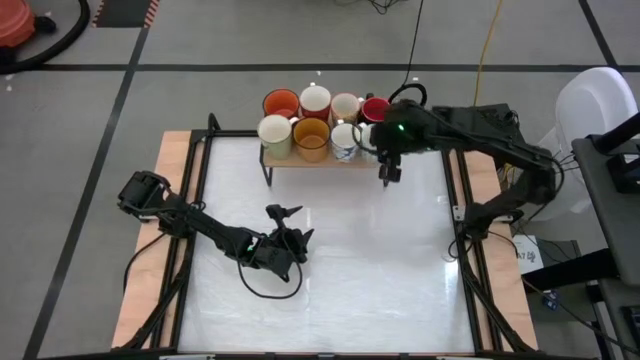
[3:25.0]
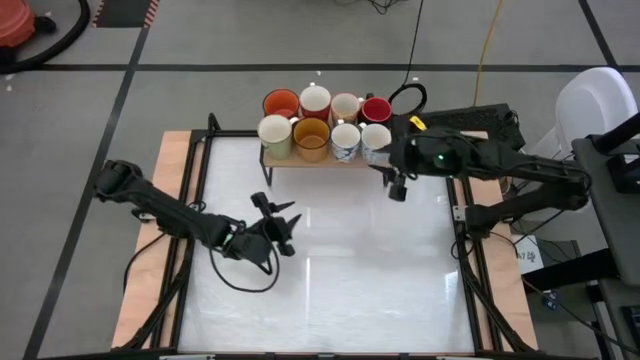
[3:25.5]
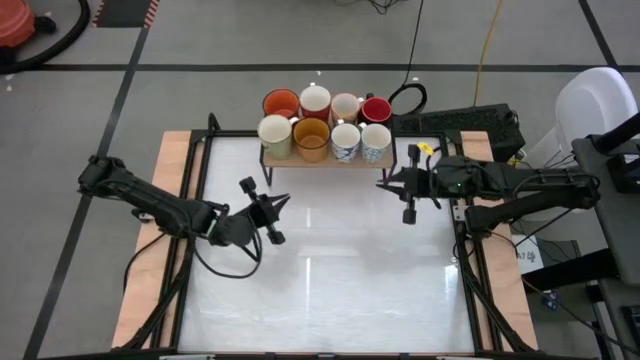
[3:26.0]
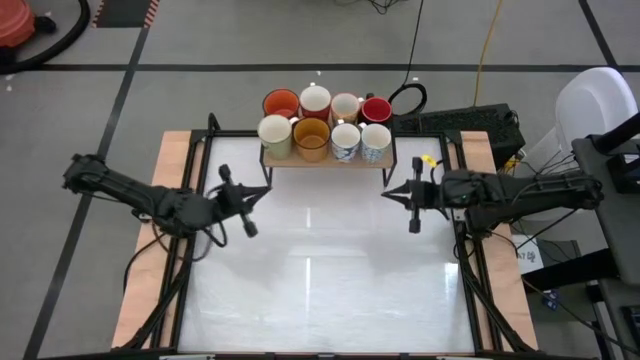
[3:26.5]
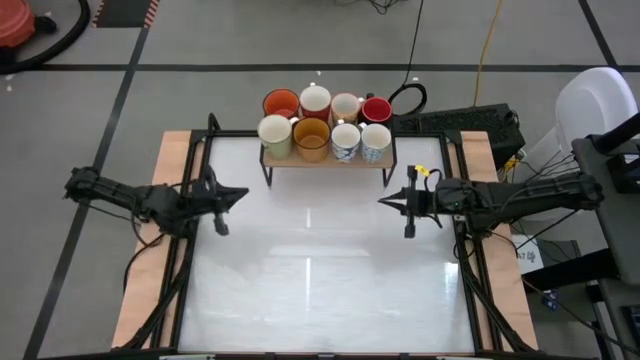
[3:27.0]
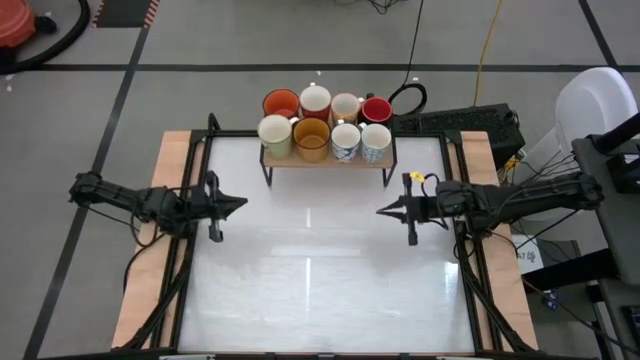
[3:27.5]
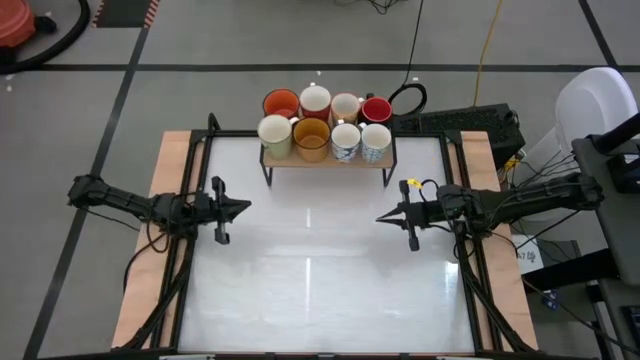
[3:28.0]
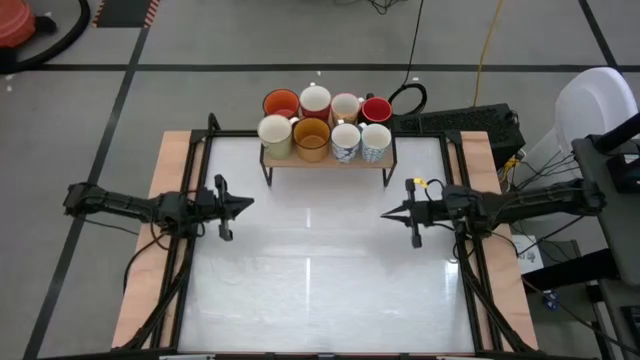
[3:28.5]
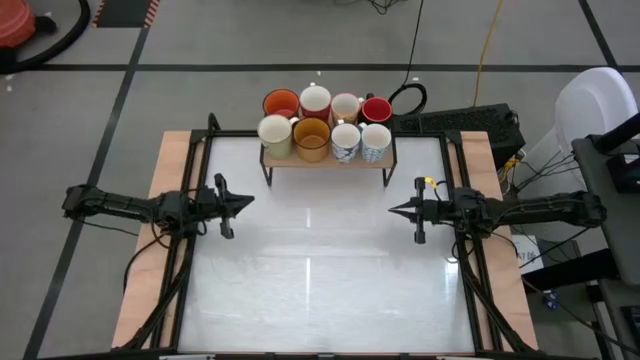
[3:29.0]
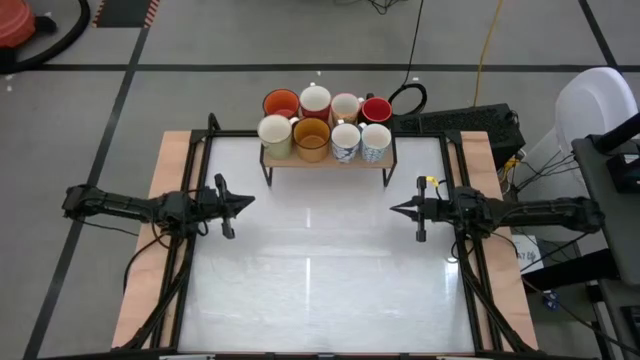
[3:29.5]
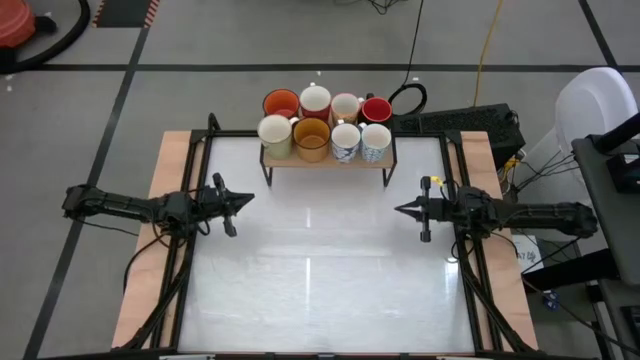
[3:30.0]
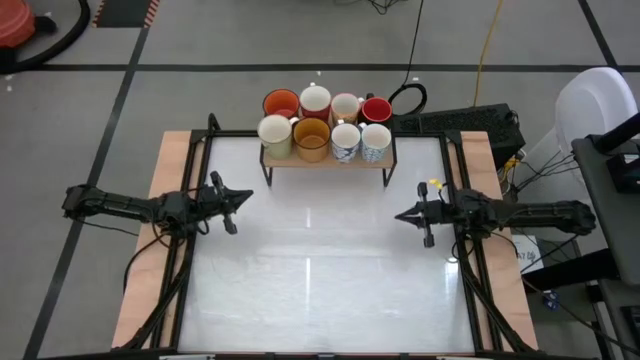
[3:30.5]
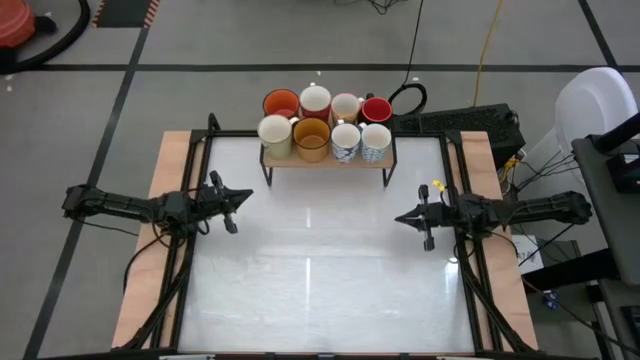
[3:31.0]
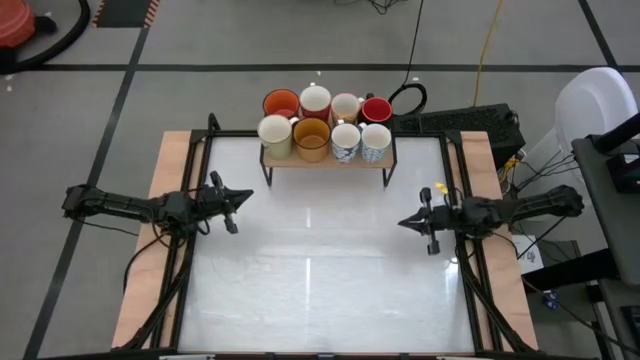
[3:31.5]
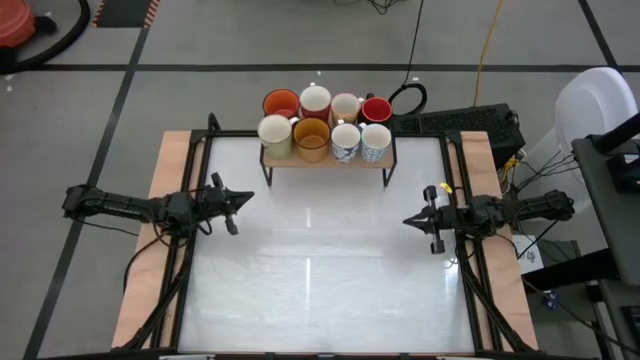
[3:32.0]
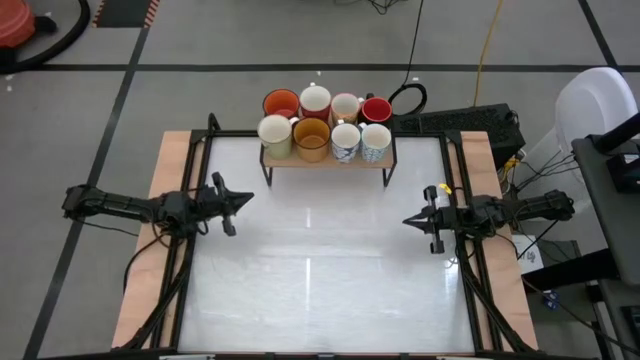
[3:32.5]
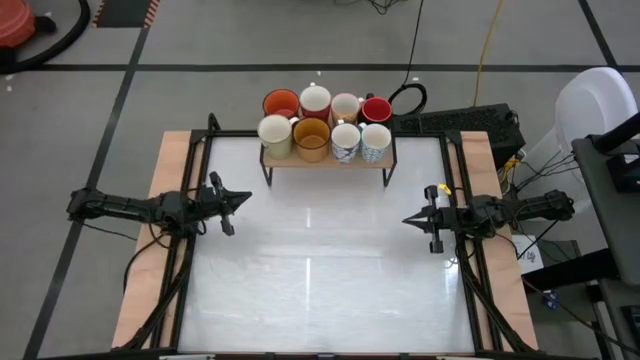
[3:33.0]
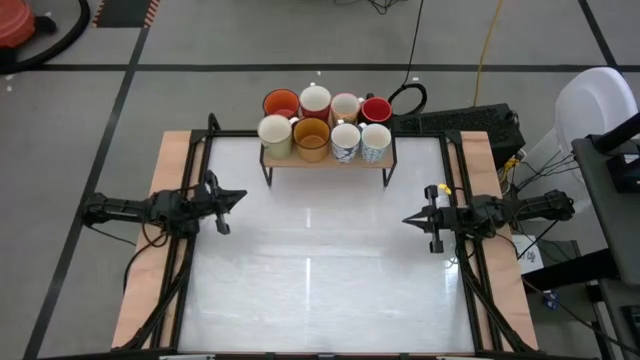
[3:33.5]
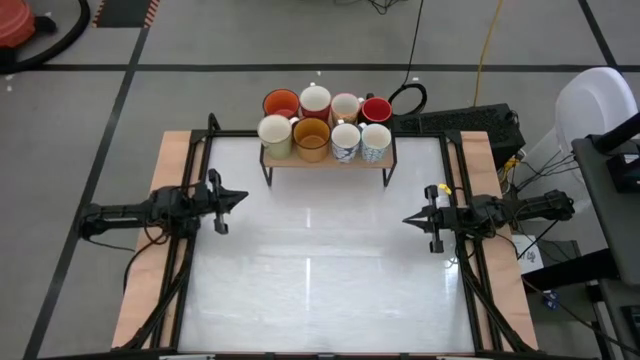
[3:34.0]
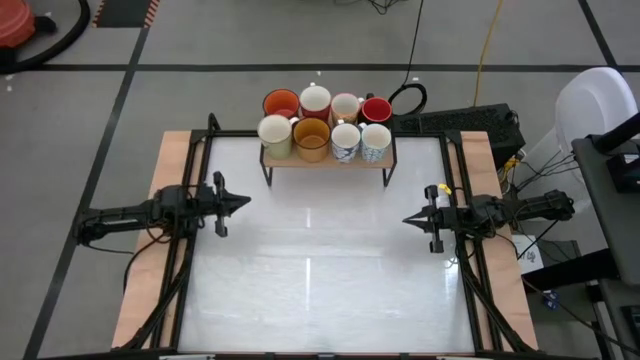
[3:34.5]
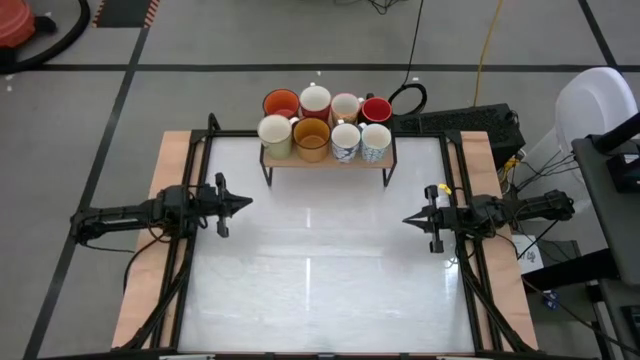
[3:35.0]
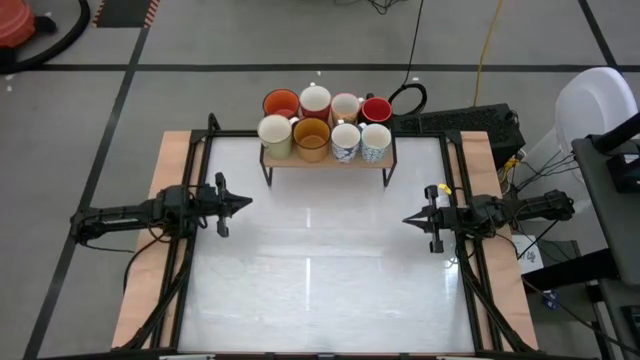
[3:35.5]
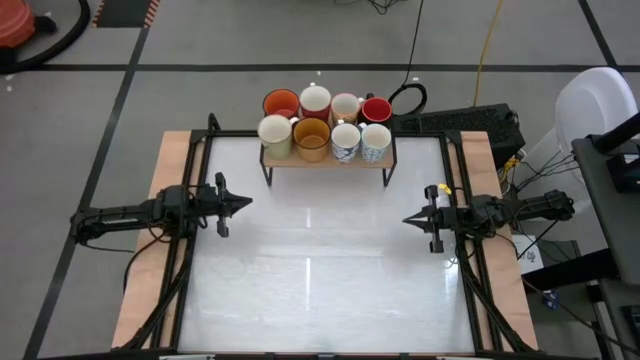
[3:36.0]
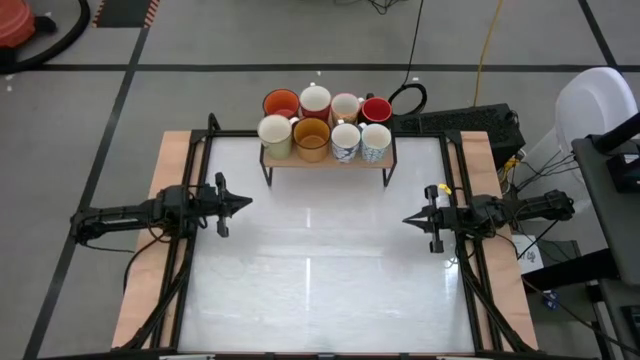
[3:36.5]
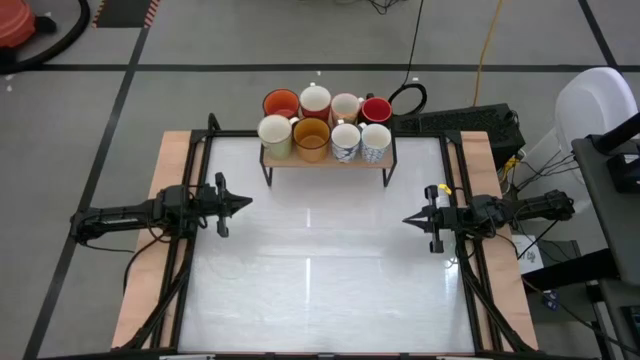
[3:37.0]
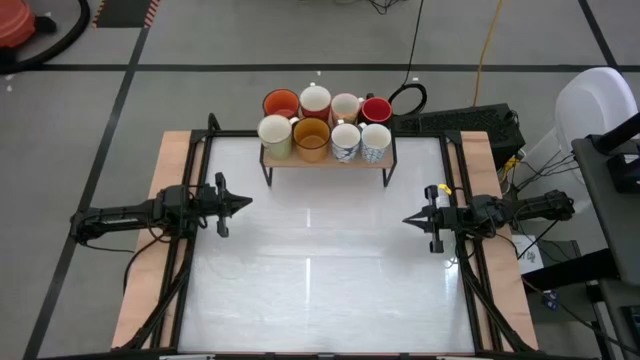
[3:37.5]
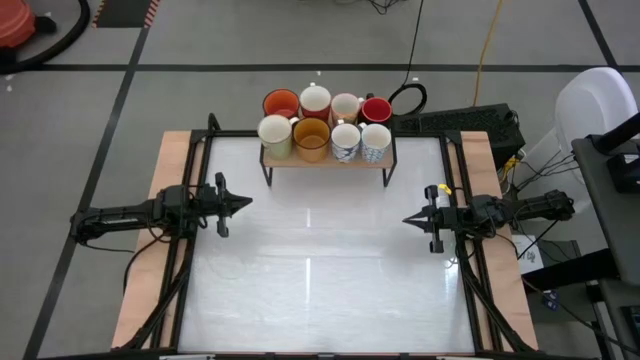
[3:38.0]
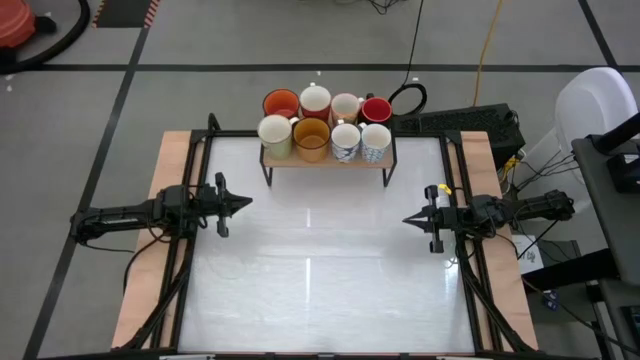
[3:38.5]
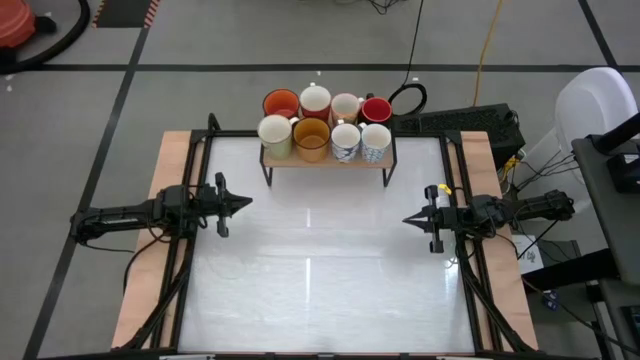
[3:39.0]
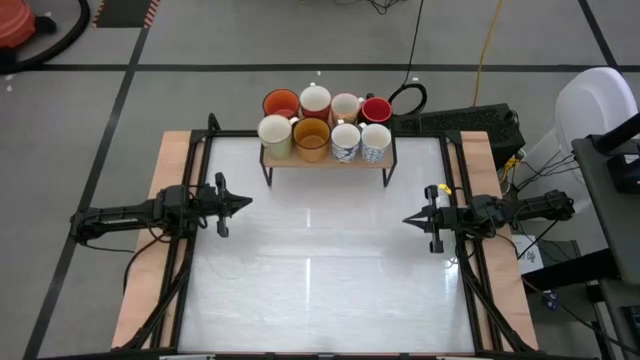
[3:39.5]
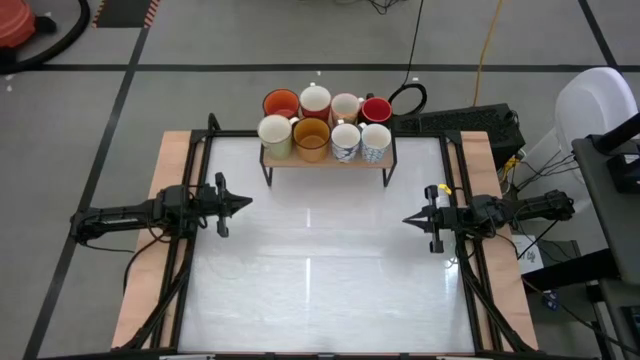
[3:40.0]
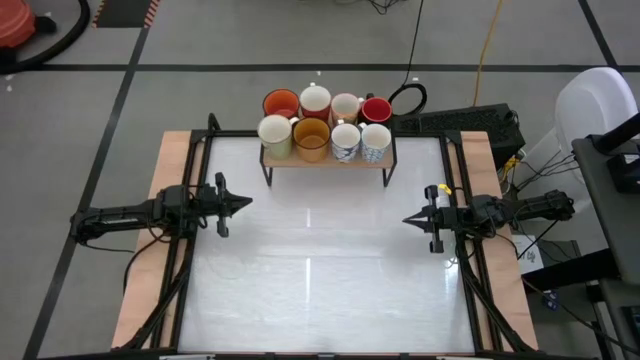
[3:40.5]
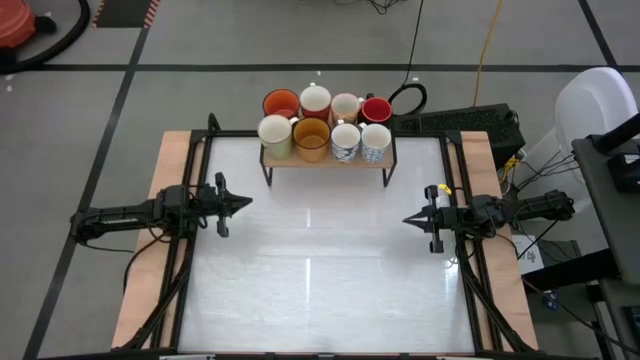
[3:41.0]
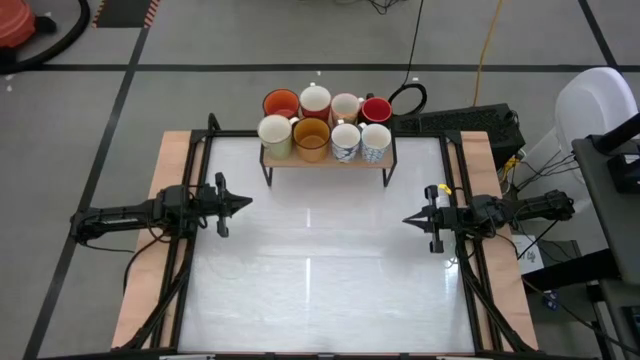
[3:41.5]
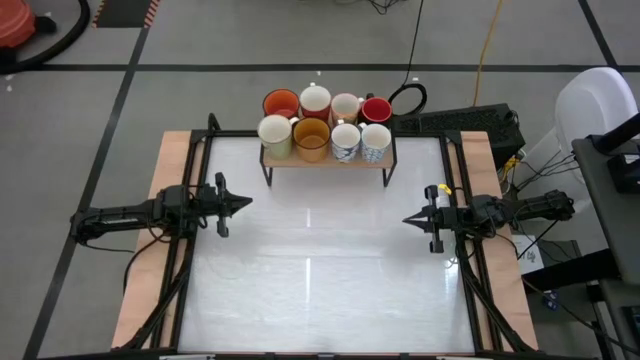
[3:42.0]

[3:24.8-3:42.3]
Task: Place coffee mugs
Return to Home Position

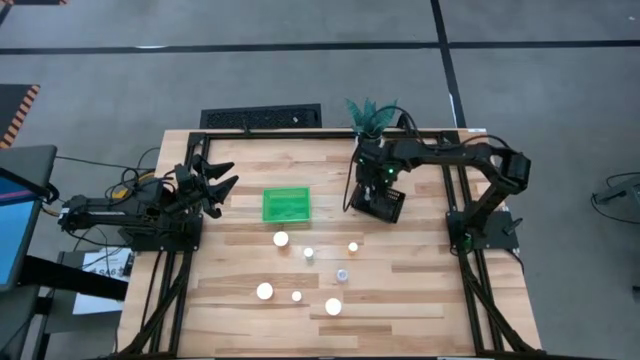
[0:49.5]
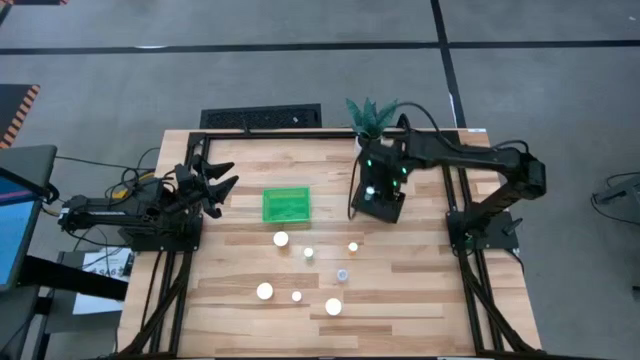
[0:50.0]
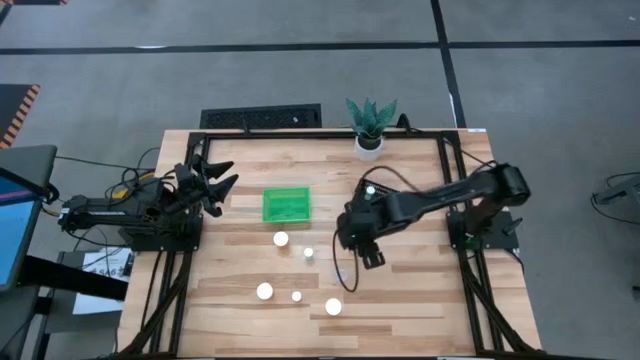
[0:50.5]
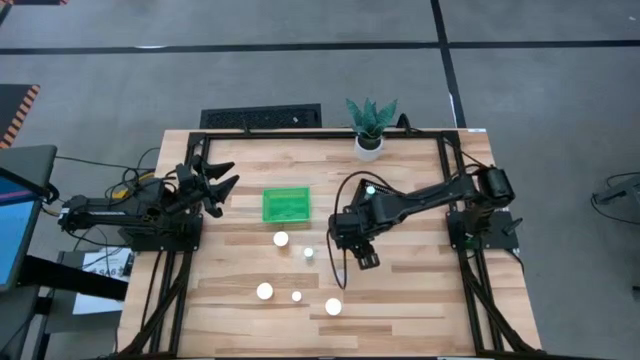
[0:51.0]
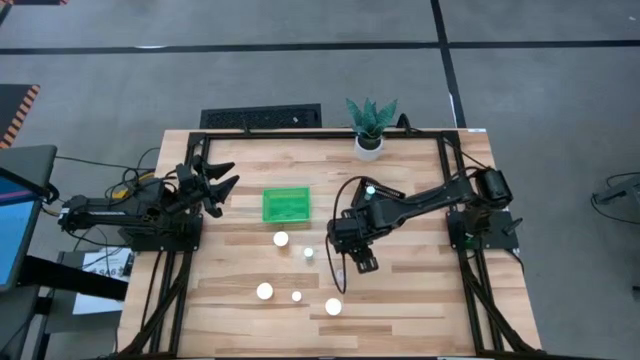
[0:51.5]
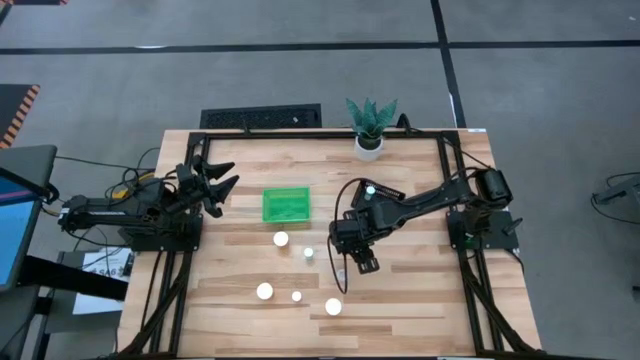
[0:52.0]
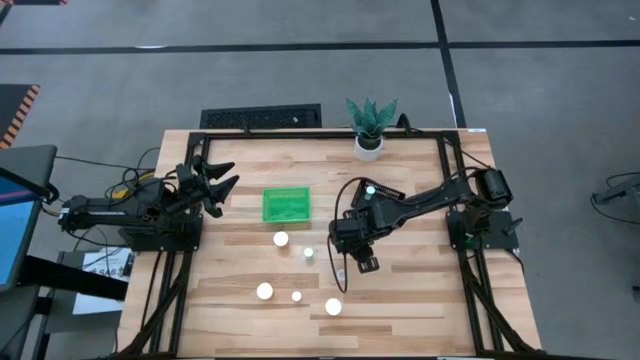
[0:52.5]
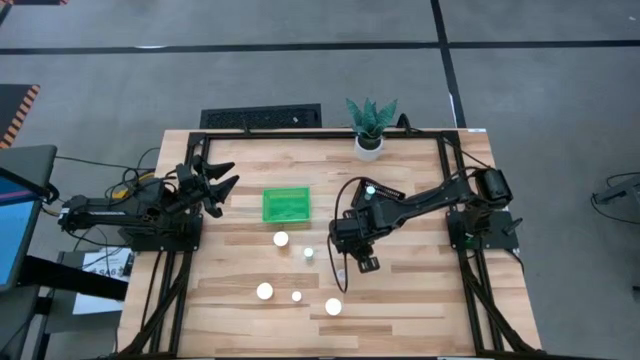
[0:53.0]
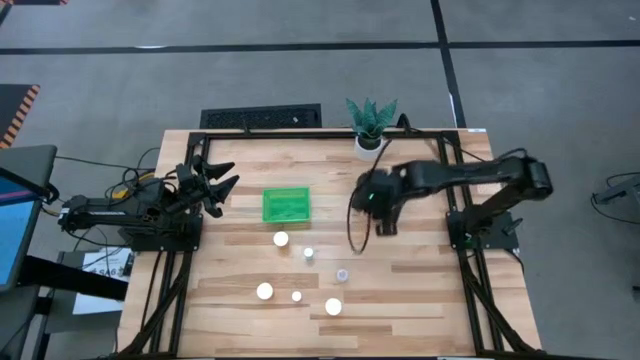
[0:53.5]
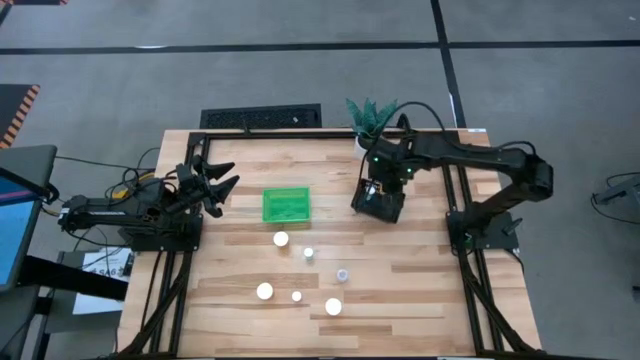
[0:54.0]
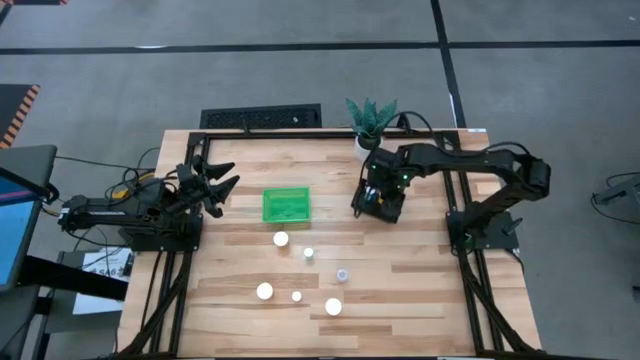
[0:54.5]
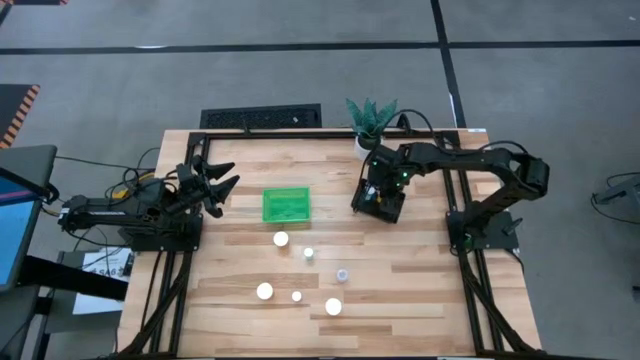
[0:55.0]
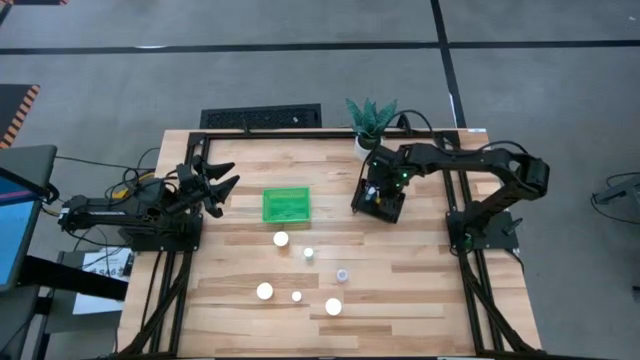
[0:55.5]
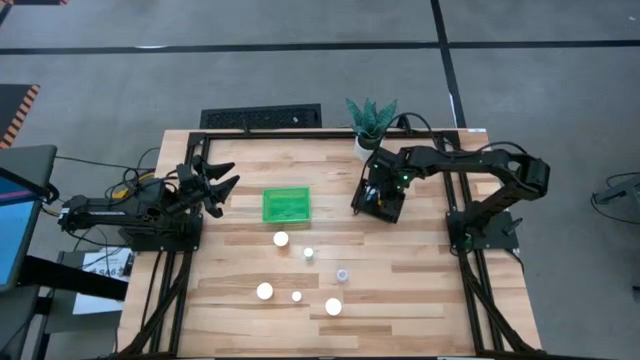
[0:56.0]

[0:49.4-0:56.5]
Task: Pick and place medicine bottles into bin by pill shape (circle, oval)
Put the orange tablet bottle into the black basket
